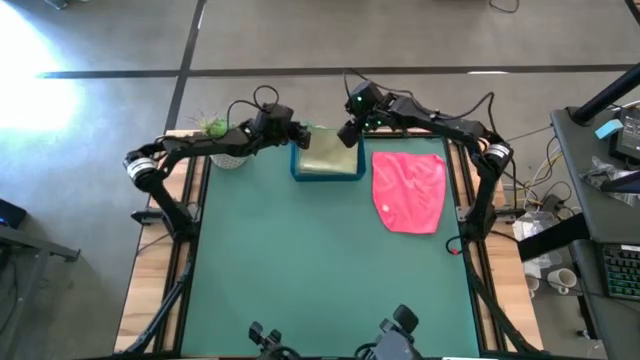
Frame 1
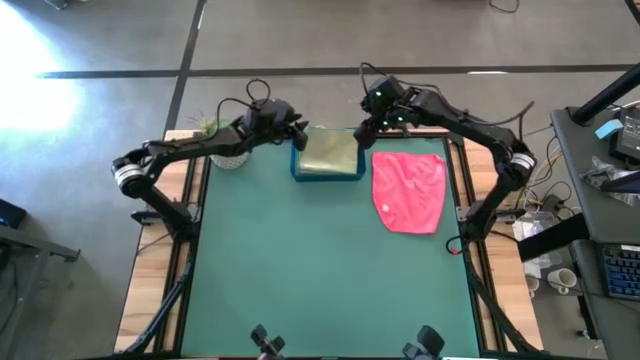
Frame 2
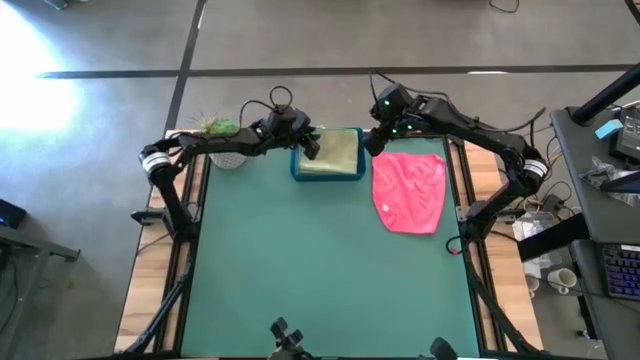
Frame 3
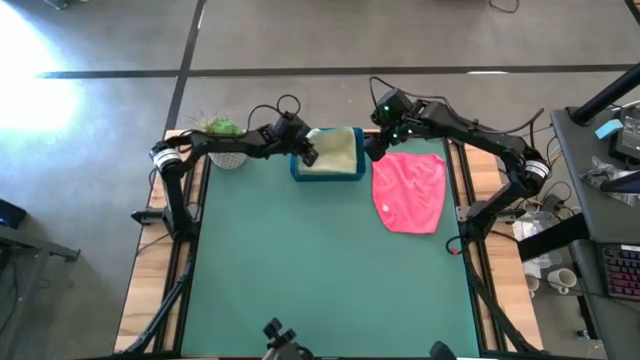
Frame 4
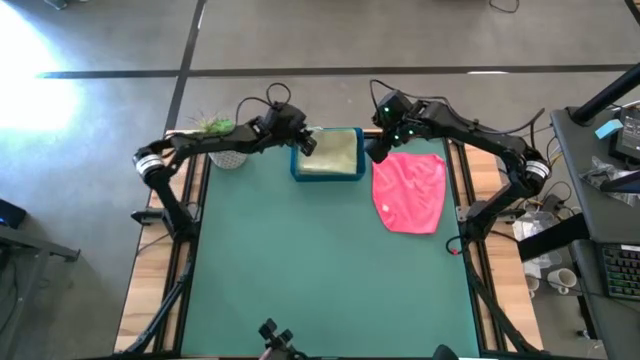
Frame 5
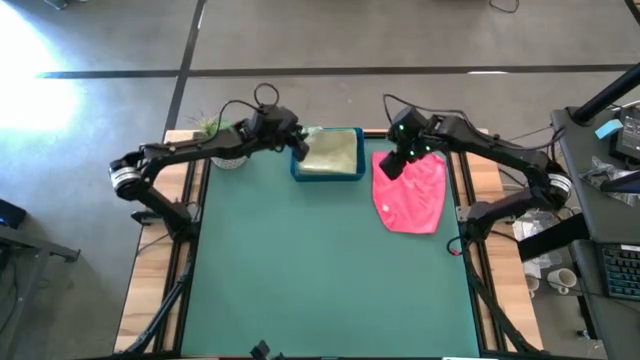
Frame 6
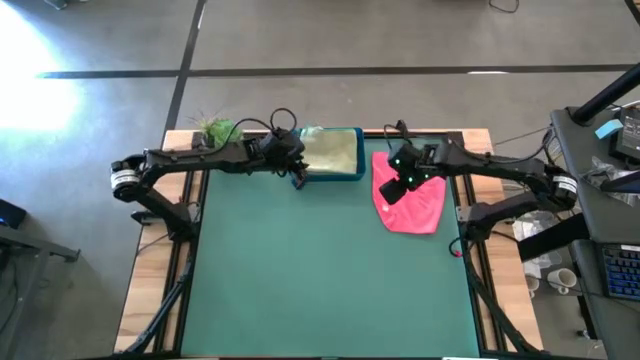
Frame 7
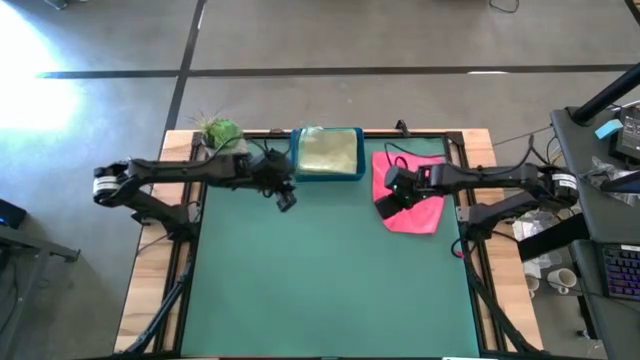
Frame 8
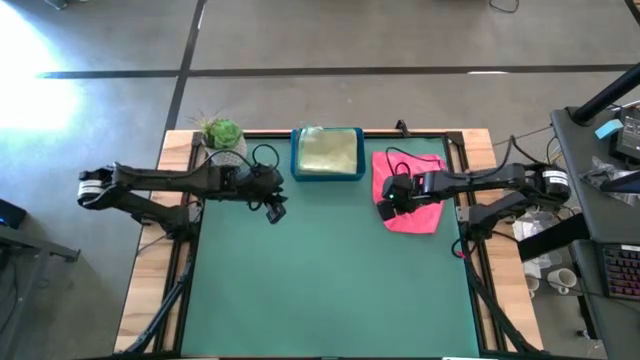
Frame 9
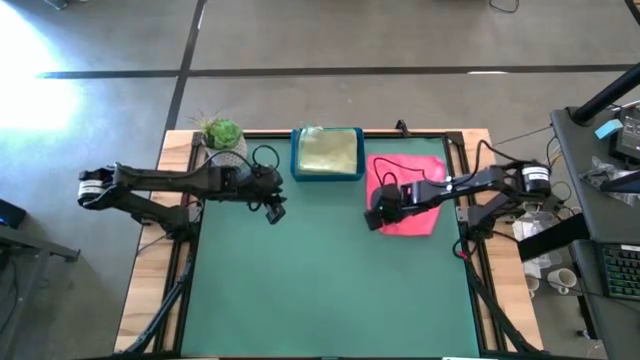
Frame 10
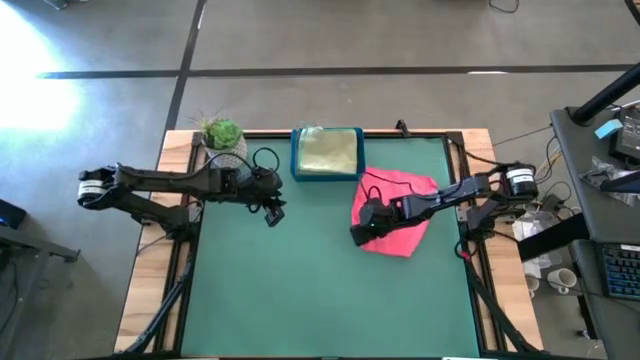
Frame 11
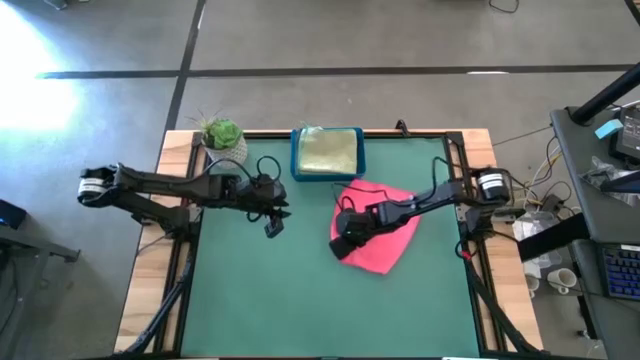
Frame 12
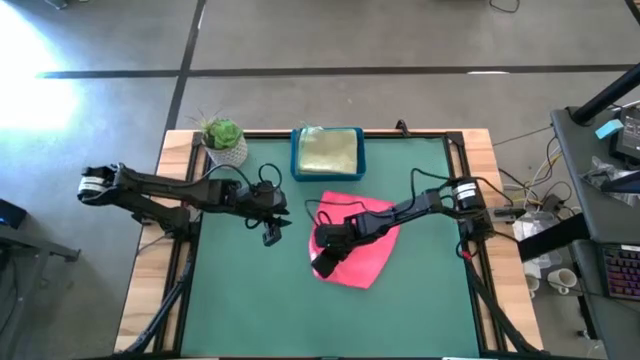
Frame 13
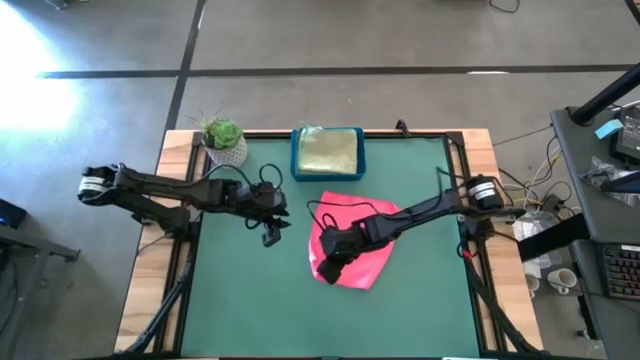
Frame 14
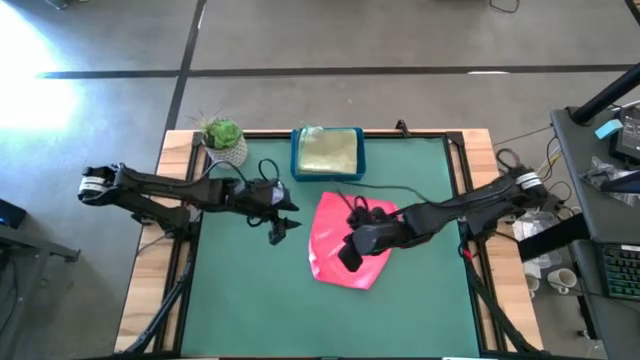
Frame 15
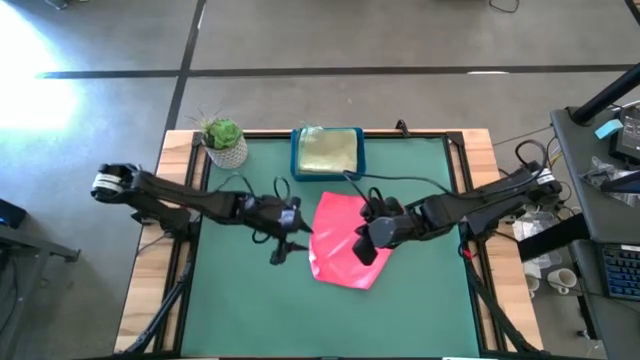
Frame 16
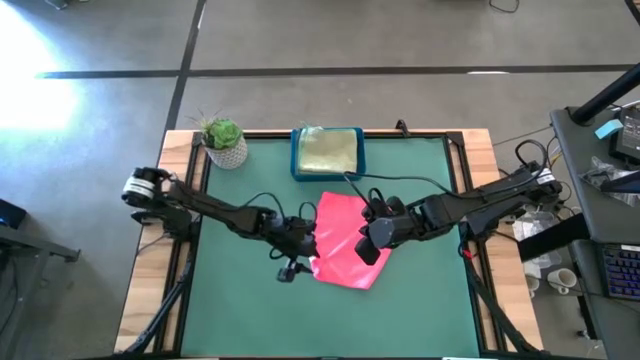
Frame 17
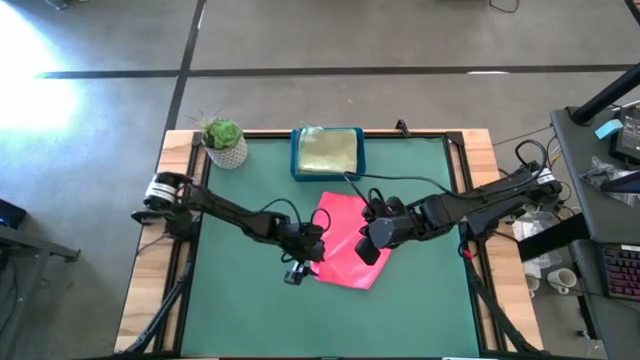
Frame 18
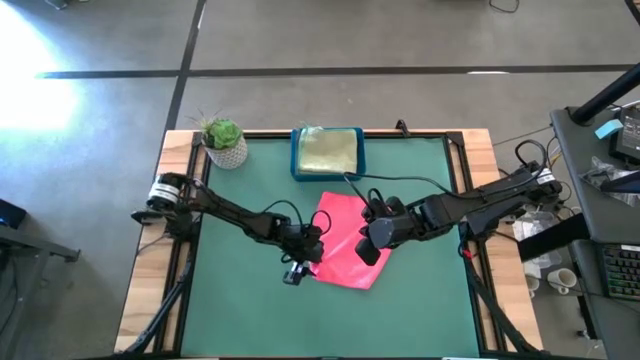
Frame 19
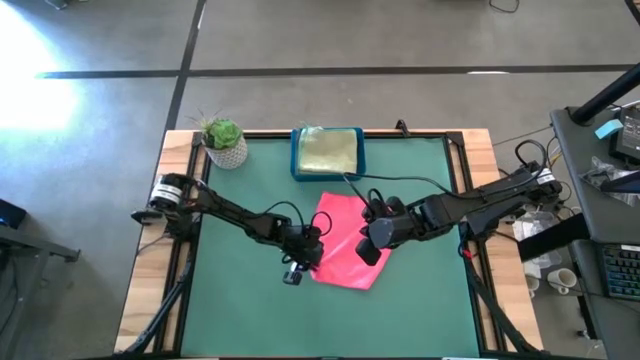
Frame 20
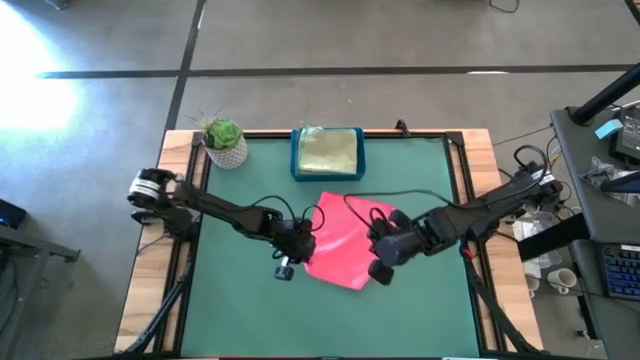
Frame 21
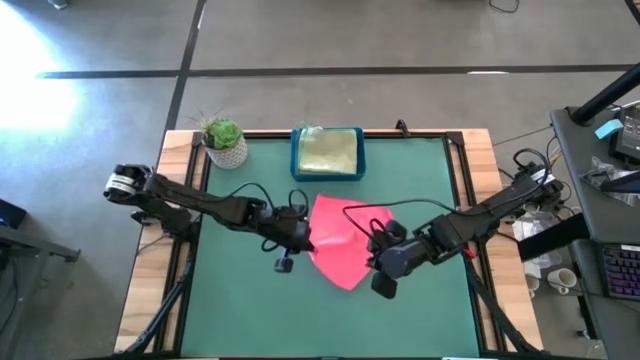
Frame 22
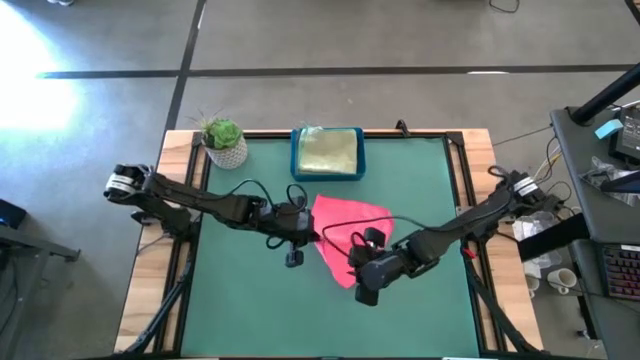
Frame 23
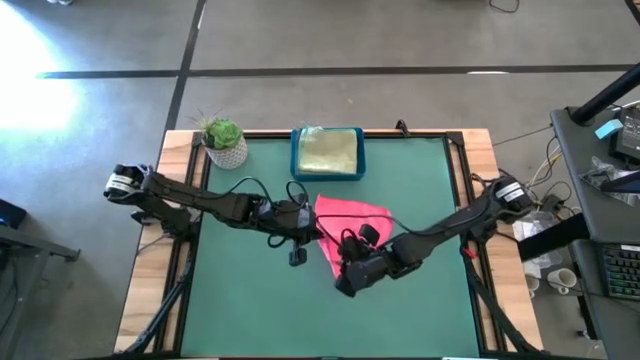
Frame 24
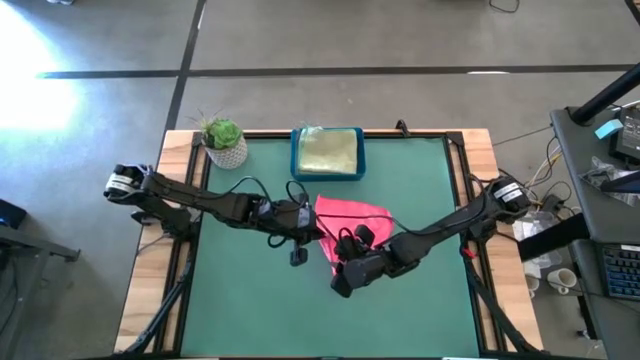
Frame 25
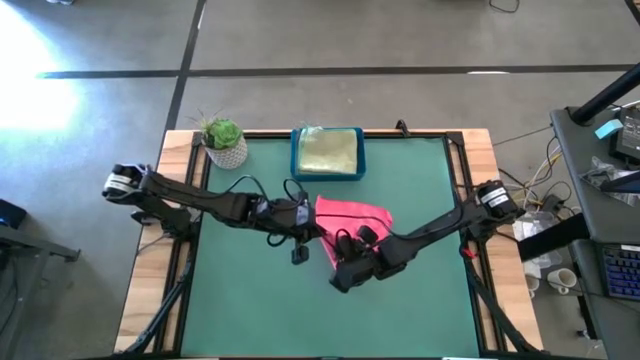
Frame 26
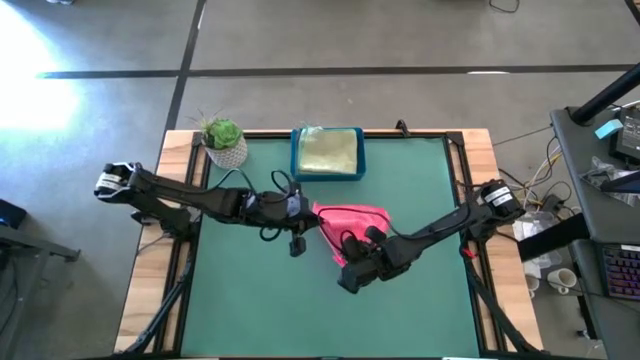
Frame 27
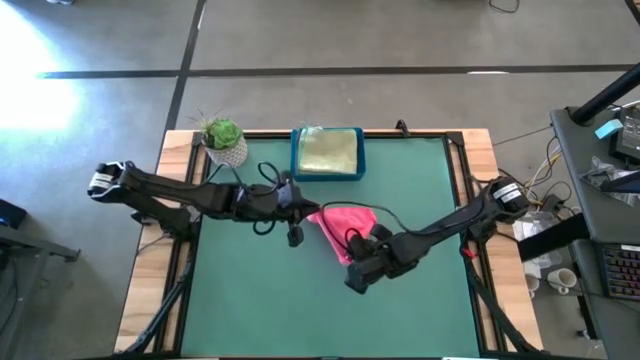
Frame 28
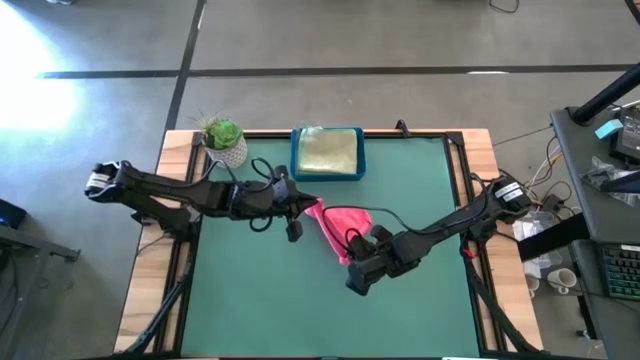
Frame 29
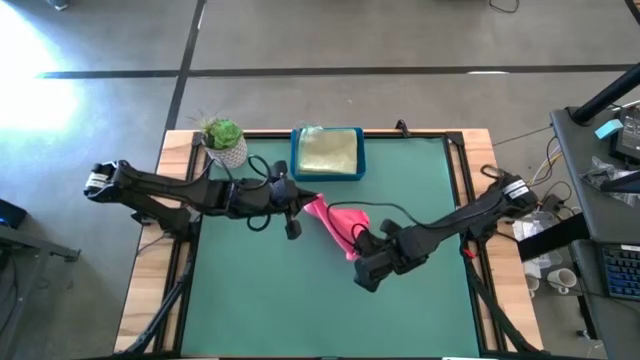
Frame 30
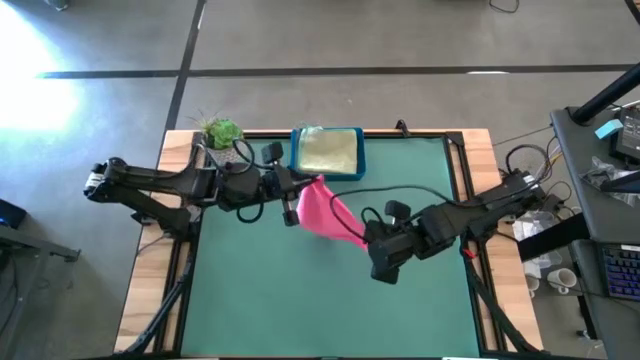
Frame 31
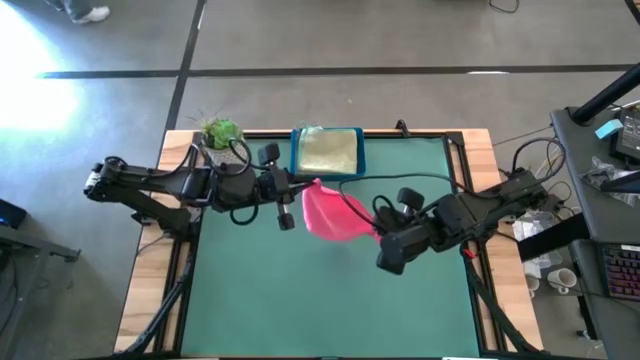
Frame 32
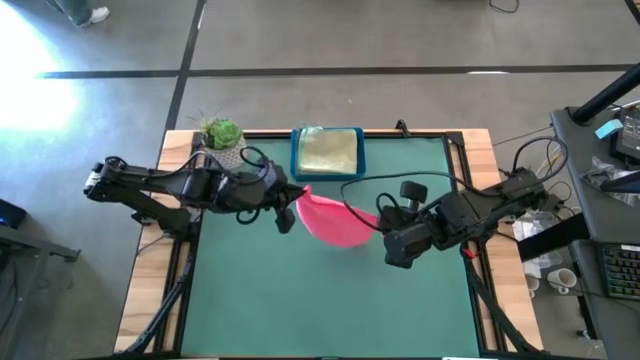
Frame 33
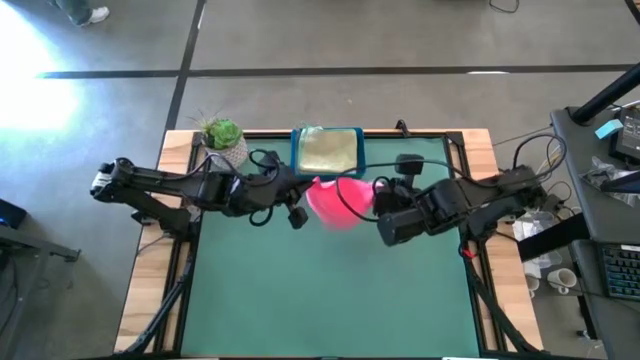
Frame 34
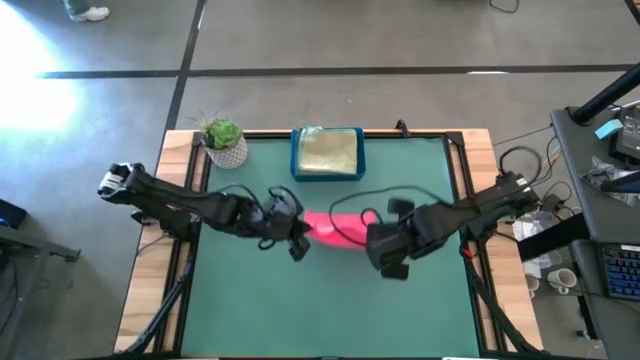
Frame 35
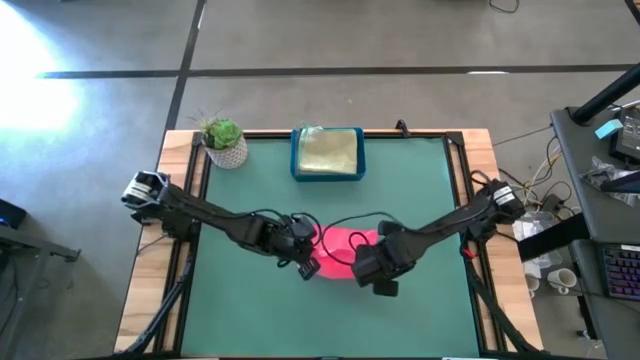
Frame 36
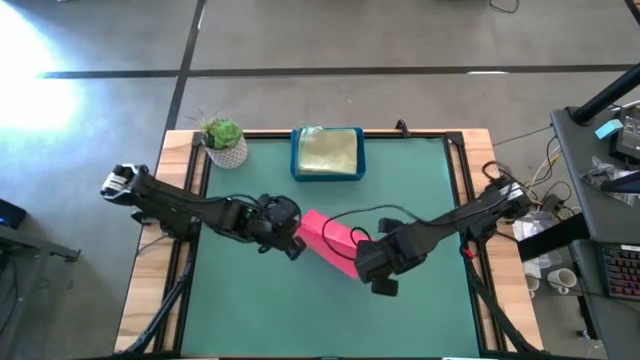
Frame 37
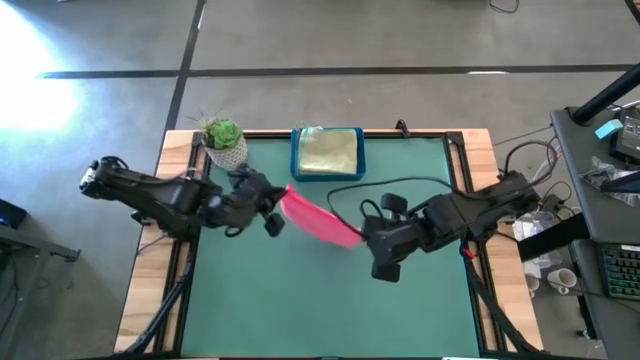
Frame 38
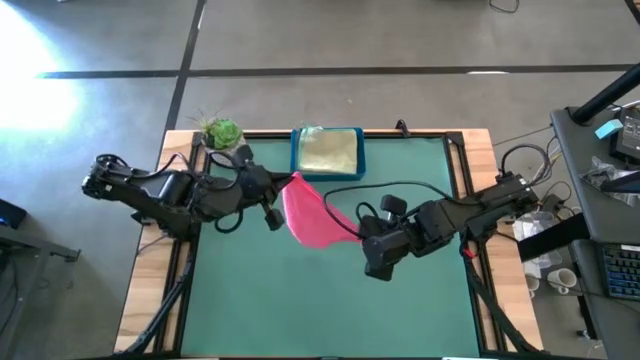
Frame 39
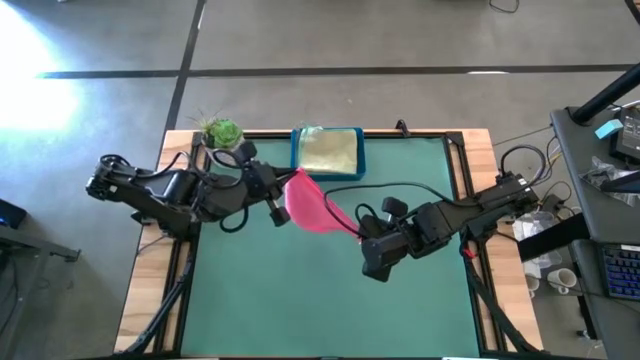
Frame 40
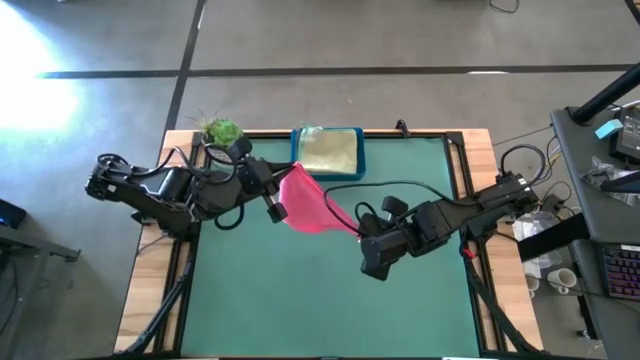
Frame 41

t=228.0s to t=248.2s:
Task: Fold microfiber towels
Fold the pink microfiber cloth

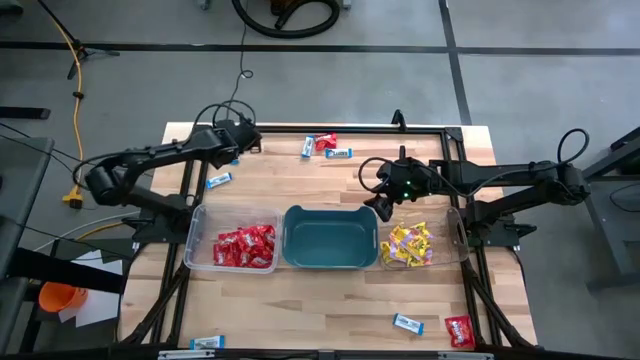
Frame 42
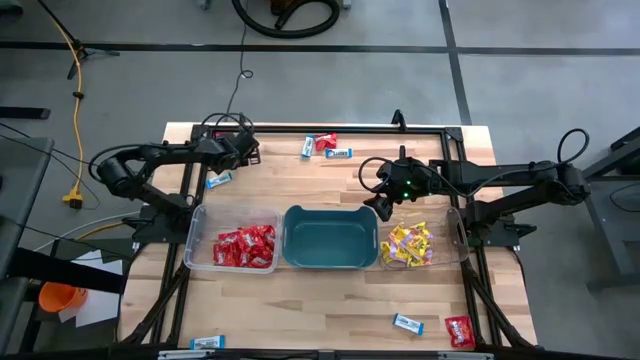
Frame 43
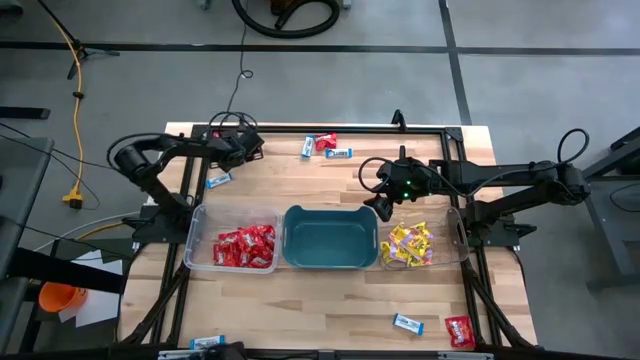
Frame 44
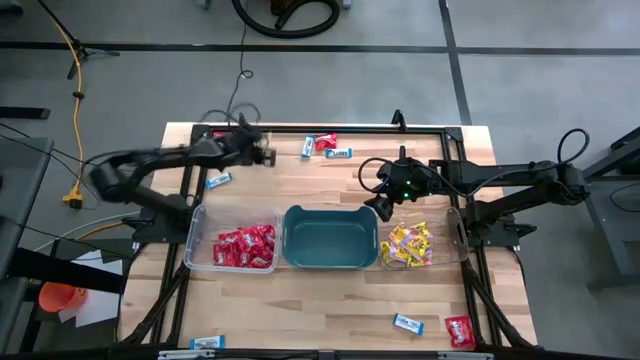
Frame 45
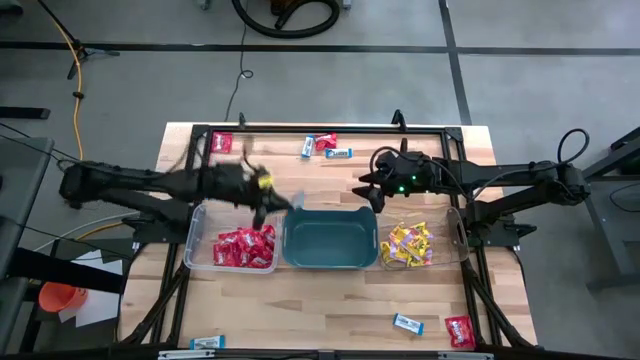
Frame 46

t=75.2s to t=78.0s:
Task: Sort candy
Put the white chocolate into the blue bin
